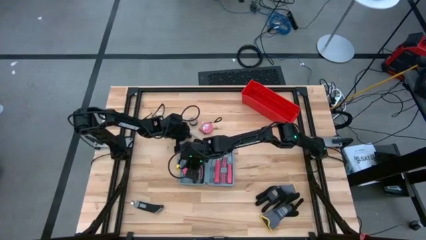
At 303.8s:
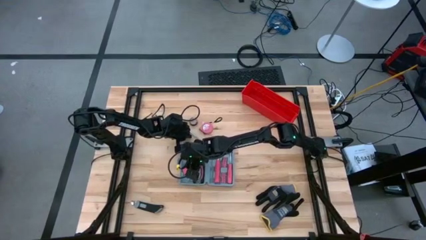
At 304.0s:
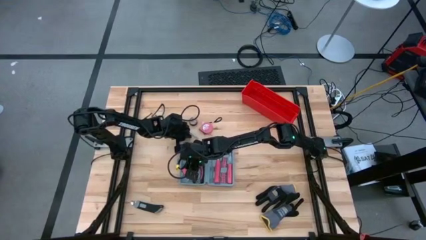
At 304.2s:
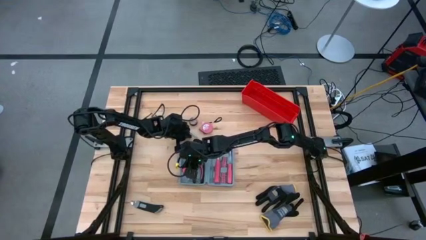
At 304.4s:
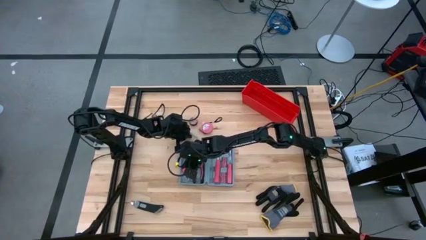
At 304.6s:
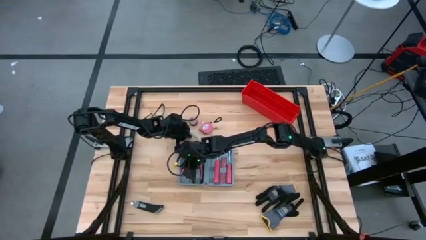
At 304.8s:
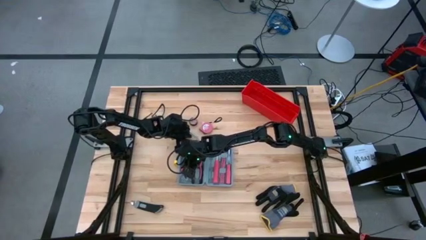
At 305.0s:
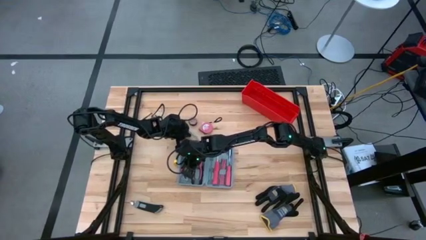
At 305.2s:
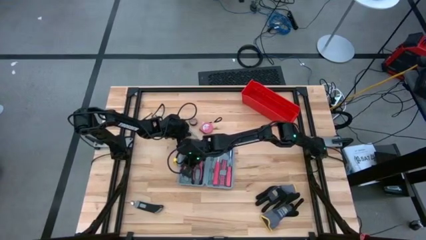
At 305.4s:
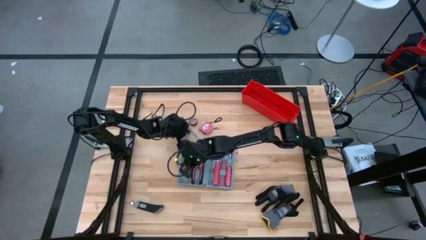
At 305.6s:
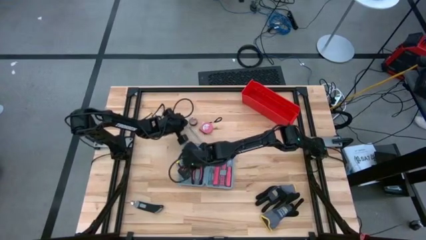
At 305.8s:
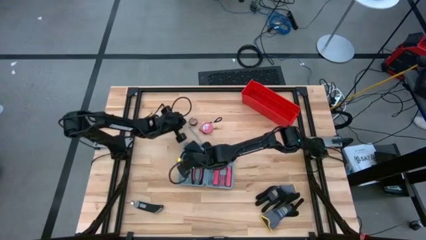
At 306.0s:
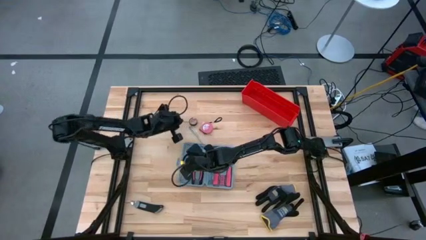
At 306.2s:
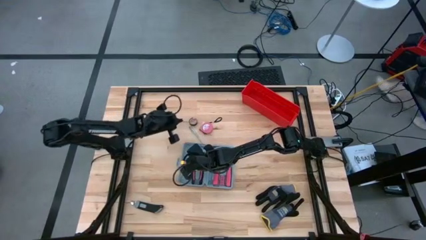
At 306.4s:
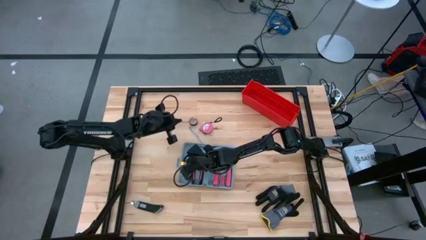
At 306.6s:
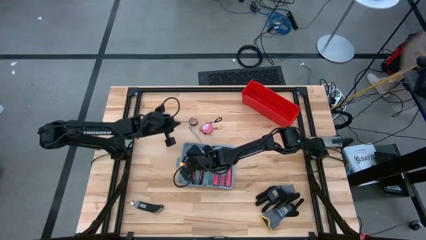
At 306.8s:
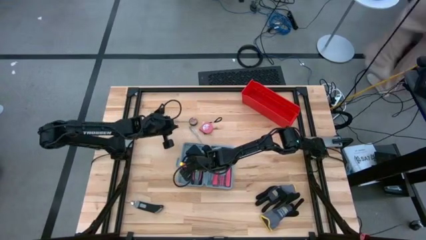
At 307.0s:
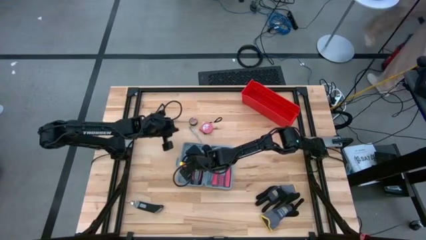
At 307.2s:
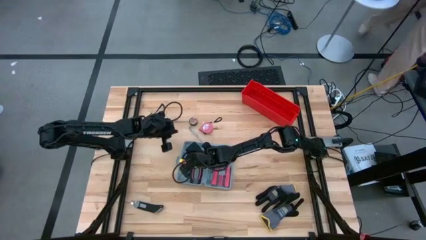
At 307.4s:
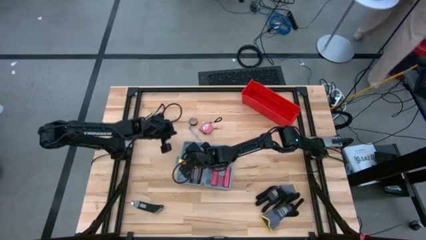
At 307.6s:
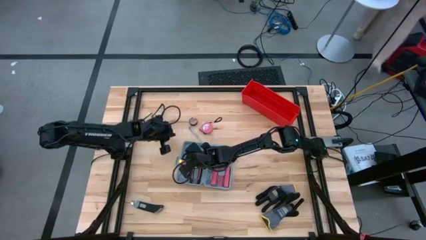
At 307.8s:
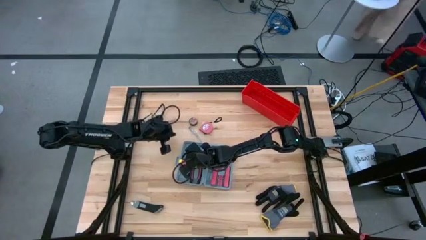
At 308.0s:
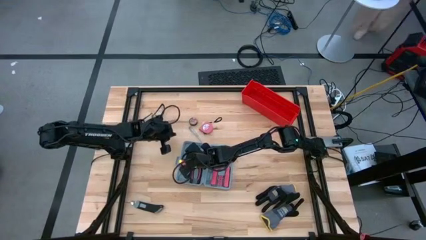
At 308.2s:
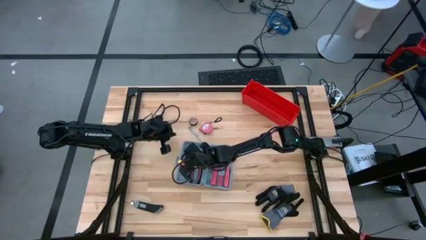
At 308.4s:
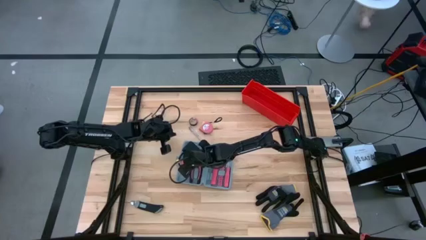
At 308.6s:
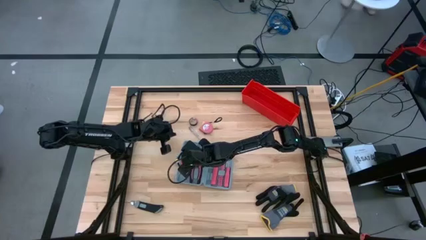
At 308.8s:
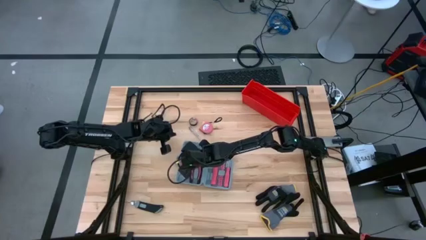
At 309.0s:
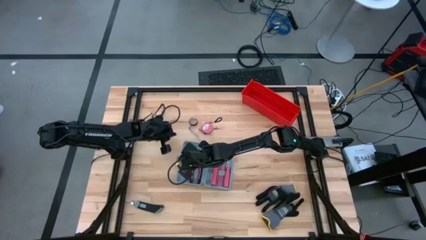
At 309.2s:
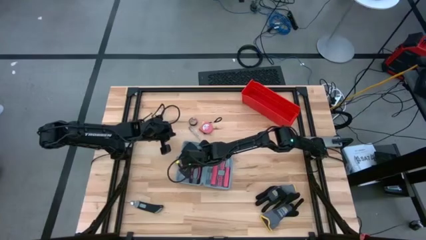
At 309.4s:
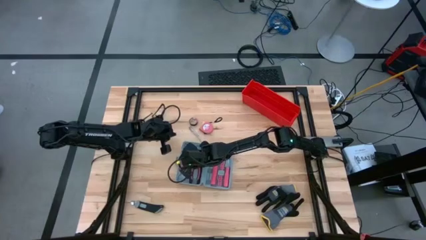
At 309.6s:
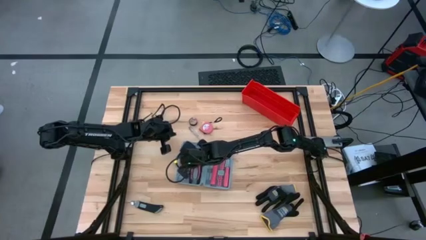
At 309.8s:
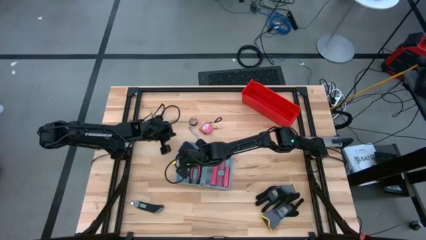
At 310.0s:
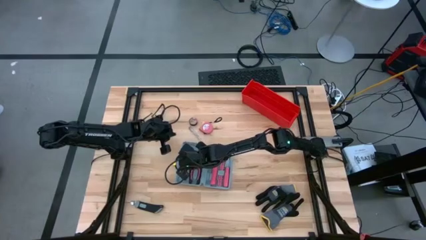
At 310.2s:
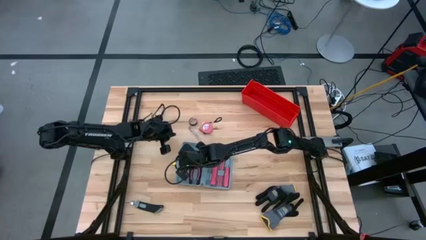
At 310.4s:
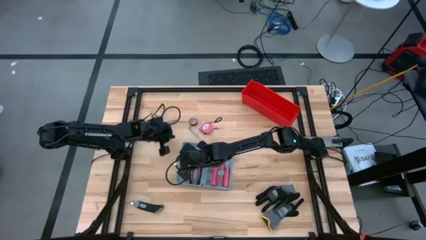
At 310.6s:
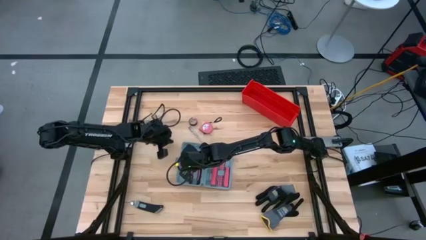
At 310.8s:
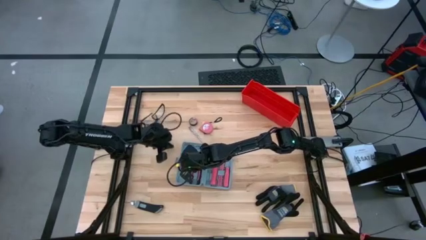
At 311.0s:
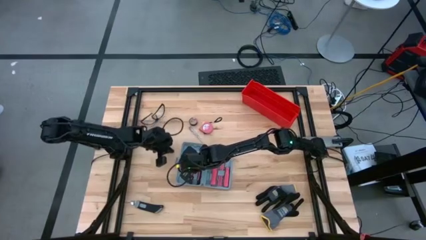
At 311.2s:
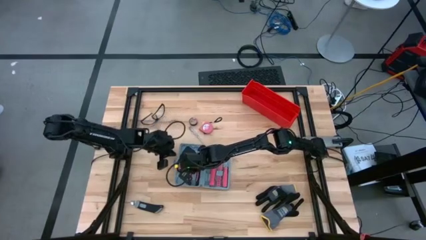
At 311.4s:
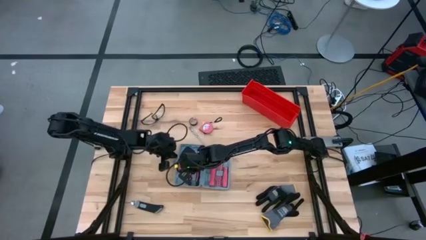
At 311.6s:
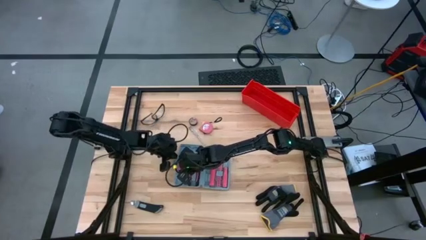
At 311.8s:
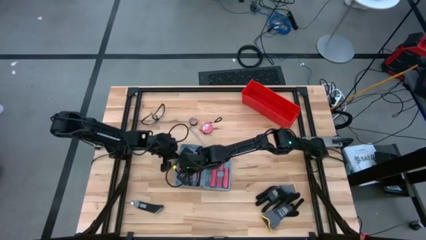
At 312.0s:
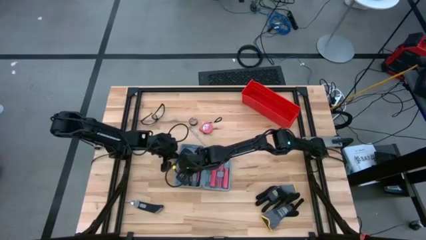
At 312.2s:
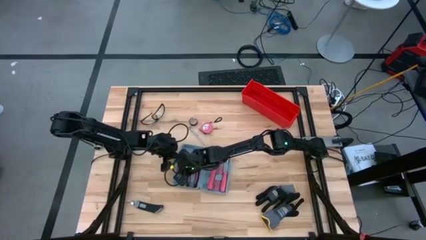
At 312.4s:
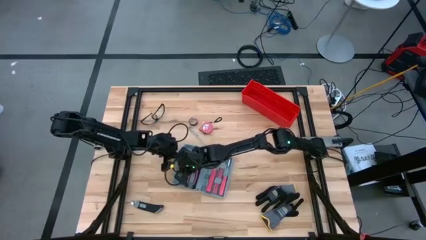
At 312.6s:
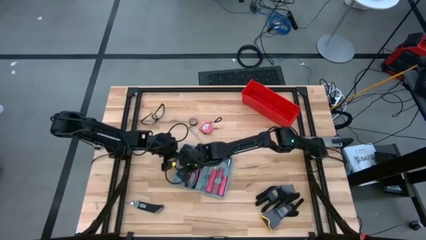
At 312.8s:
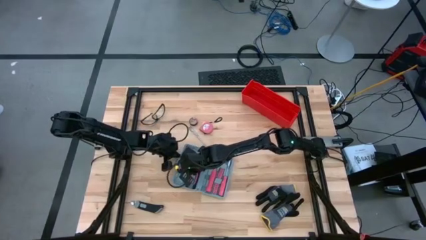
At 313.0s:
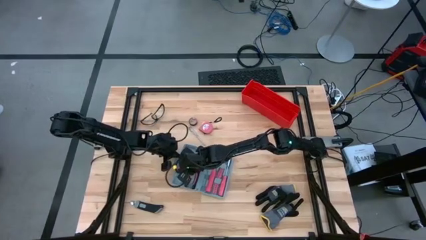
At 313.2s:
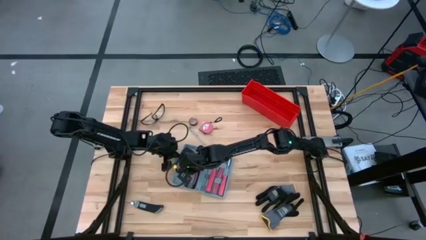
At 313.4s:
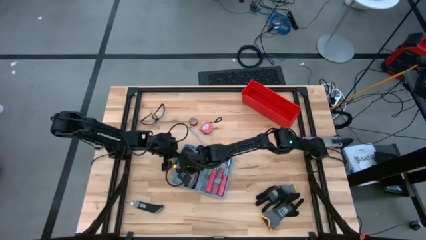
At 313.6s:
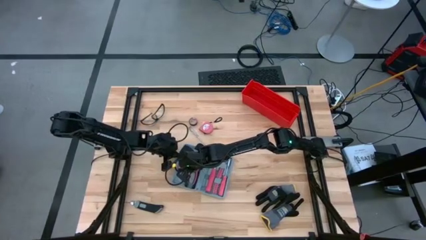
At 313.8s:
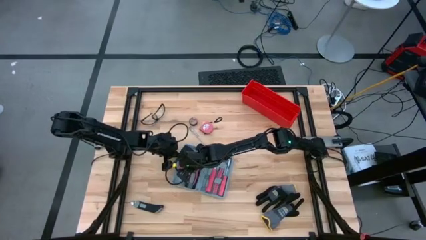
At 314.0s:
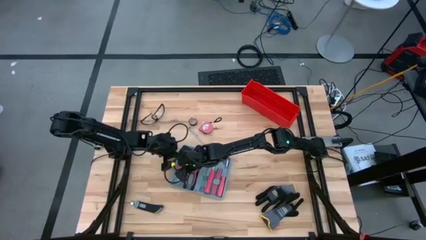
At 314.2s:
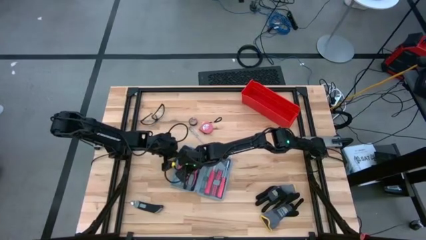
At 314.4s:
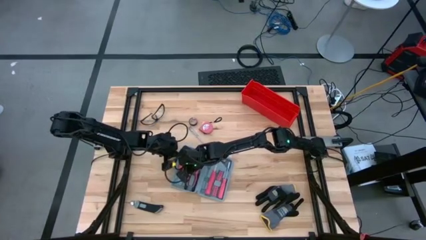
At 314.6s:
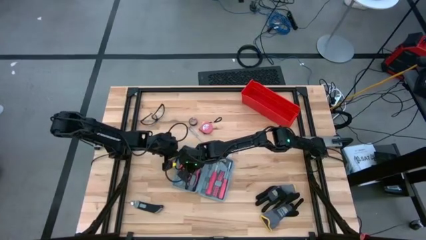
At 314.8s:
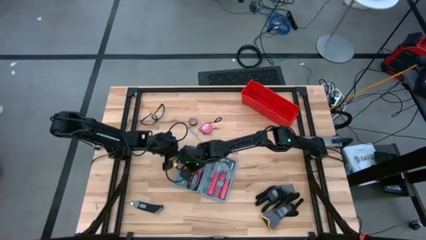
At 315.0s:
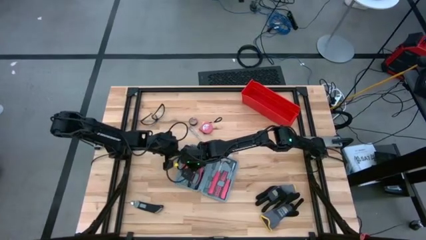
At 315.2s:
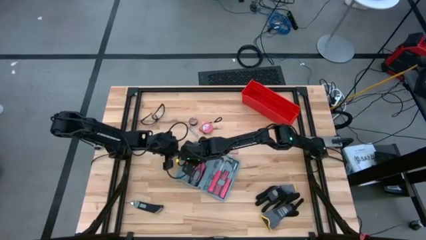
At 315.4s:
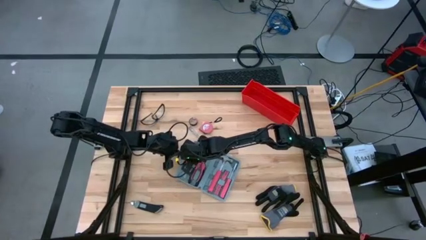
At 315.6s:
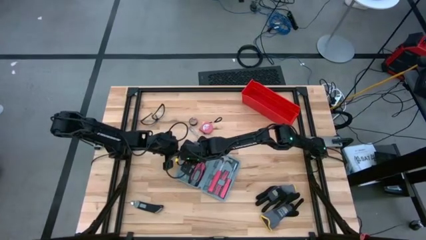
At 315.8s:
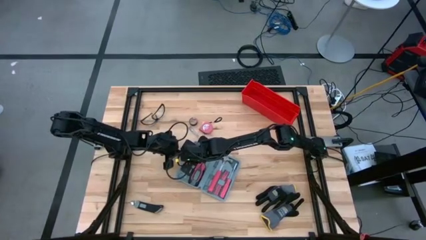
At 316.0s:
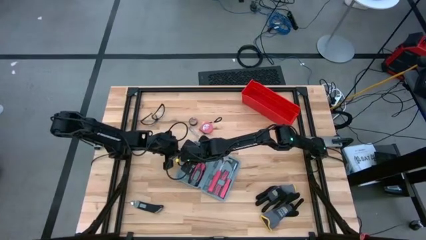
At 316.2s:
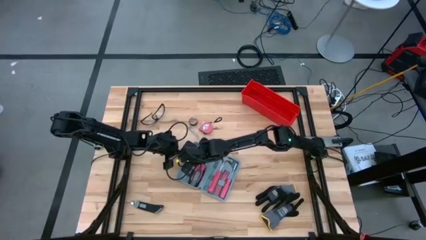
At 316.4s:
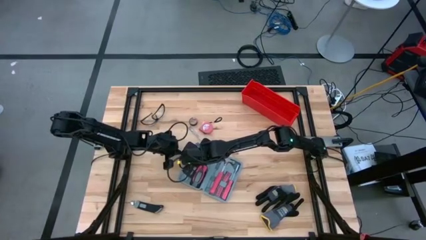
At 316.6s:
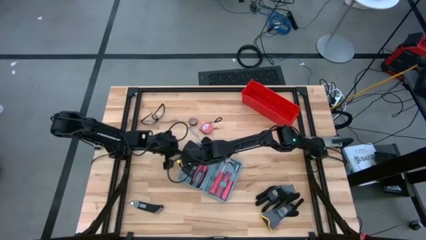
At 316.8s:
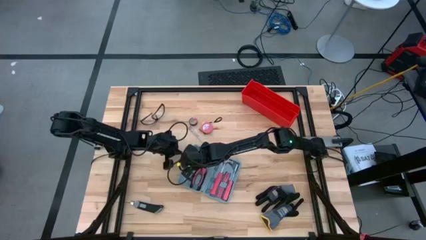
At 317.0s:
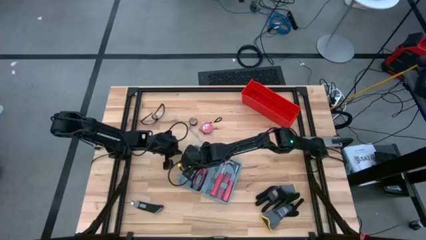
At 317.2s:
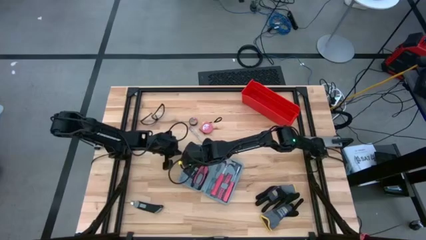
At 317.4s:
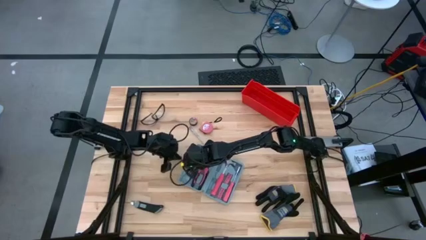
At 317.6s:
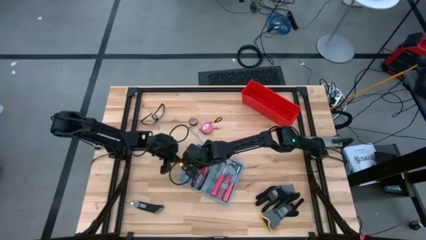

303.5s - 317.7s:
Task: prefit tool cases
Adjust the hex key on the toolbox

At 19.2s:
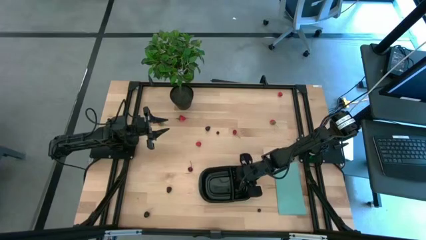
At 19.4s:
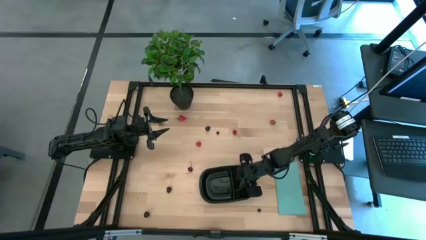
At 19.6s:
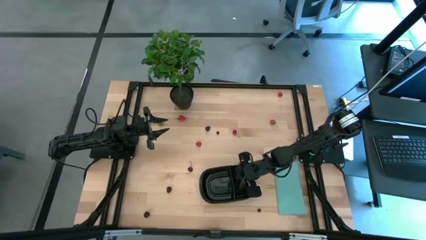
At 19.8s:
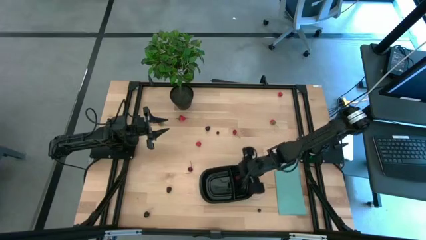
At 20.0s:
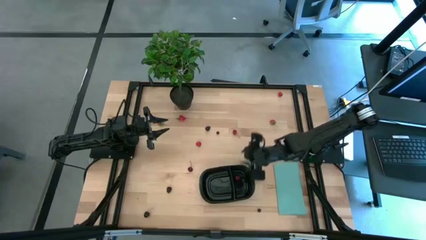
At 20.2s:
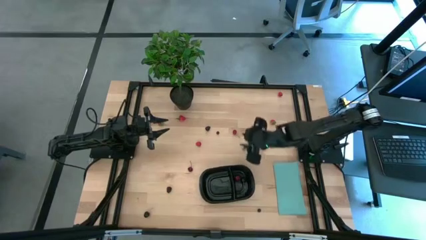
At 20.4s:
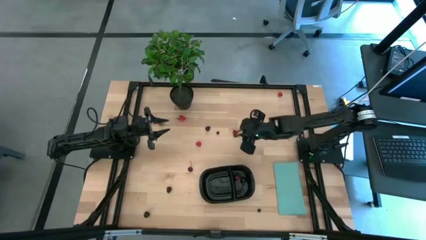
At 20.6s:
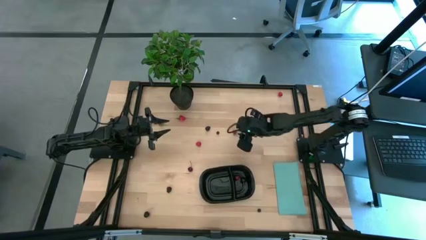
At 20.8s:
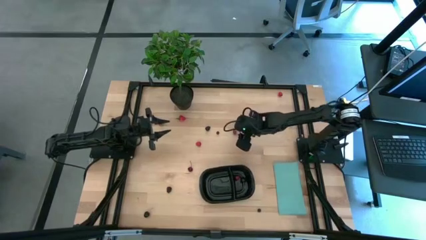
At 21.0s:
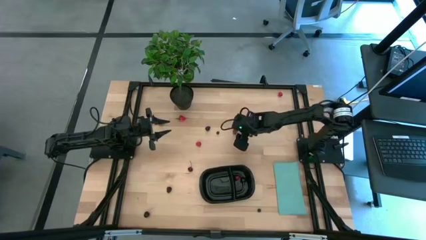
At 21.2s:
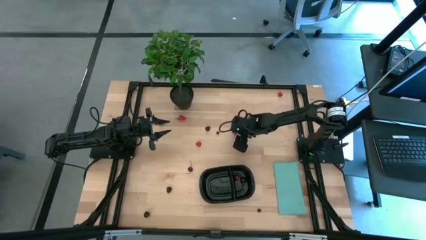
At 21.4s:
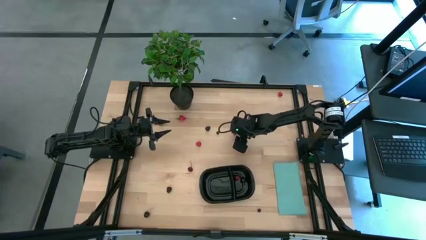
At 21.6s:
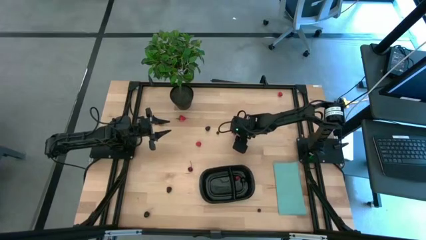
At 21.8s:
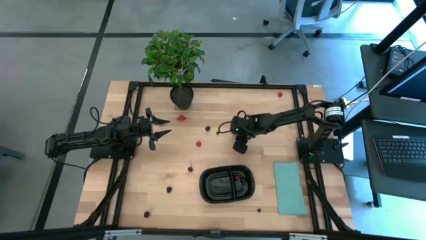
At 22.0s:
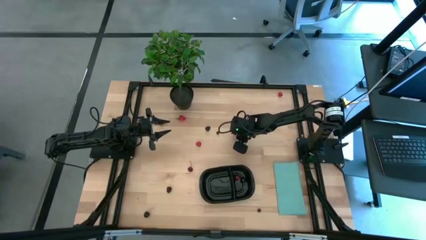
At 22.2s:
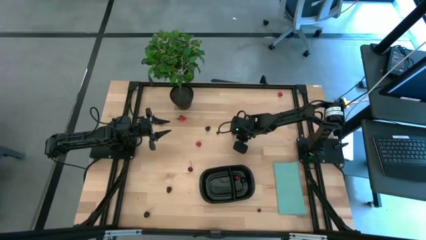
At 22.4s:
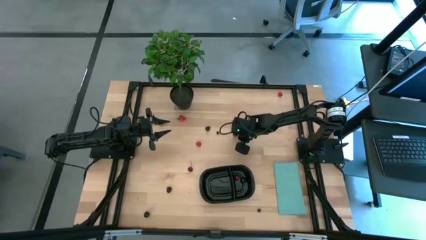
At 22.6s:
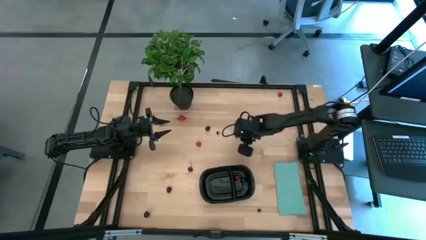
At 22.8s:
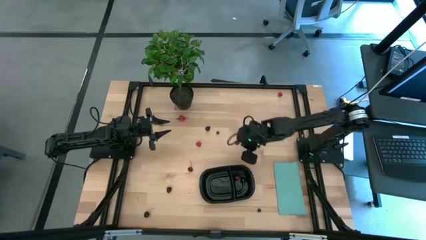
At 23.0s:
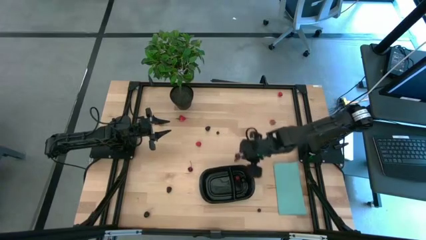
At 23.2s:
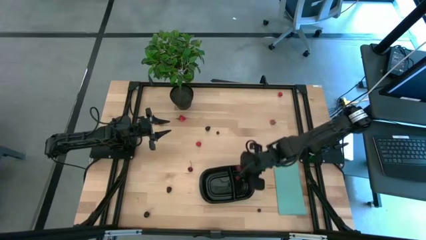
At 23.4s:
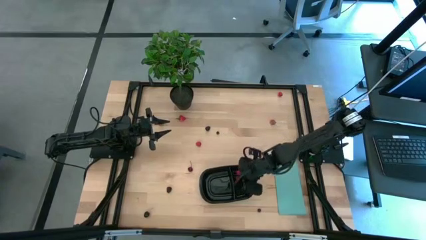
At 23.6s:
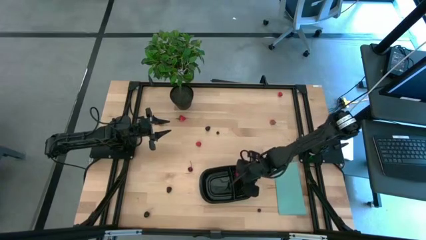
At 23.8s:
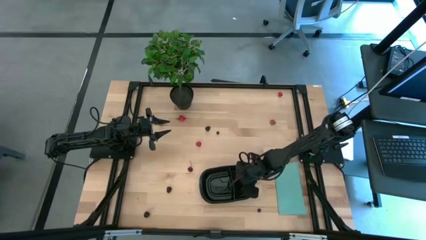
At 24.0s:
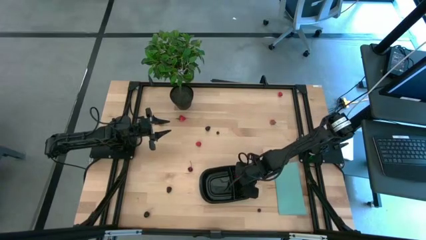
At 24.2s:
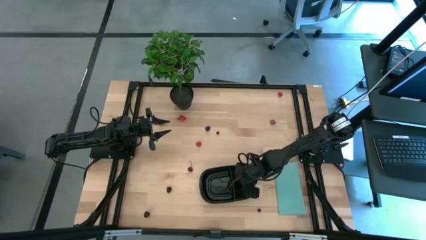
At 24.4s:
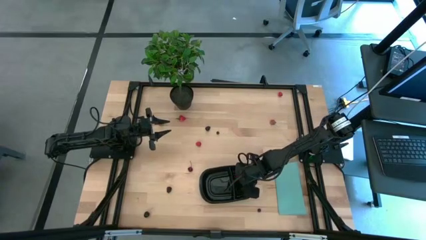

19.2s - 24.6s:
Task: Pick and placing Produce into tupperware
Put the right red cherry into the right side of the black container
